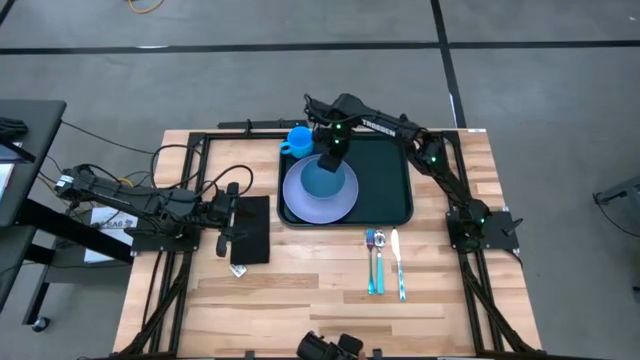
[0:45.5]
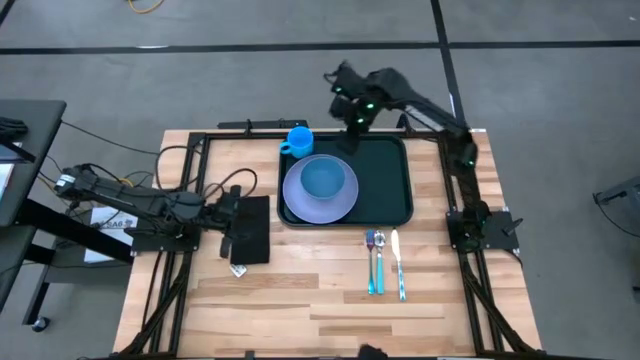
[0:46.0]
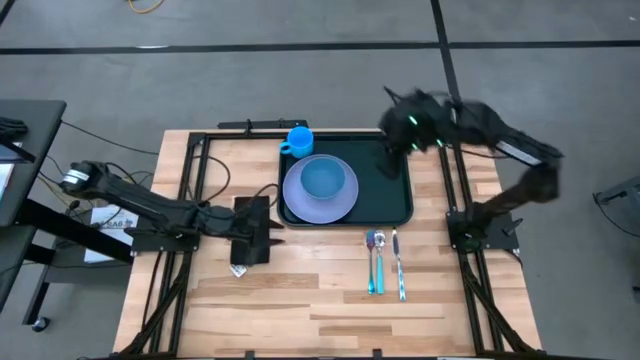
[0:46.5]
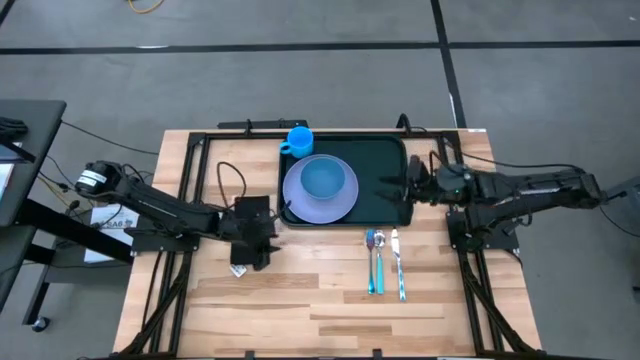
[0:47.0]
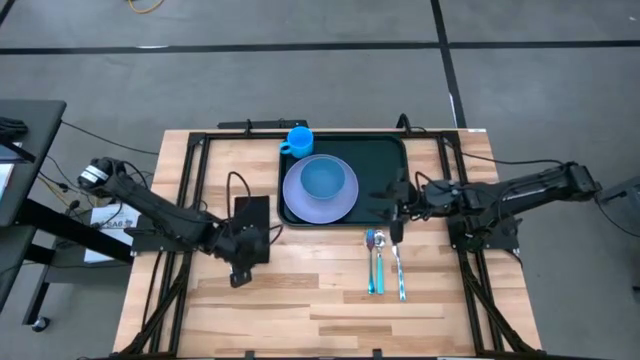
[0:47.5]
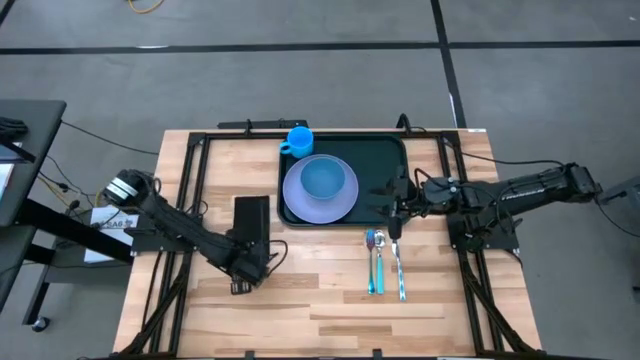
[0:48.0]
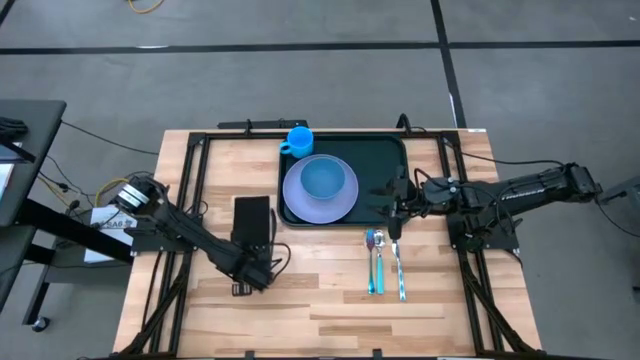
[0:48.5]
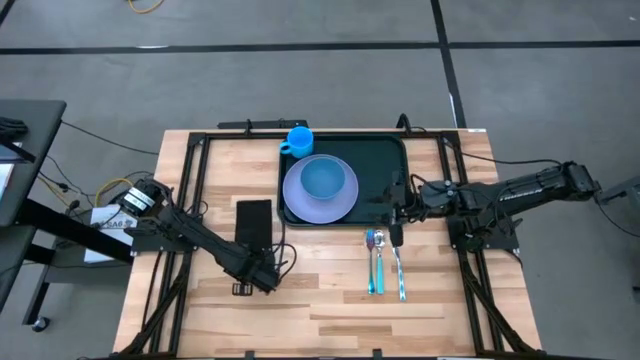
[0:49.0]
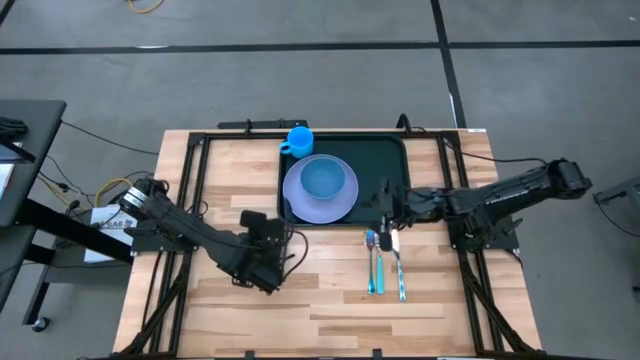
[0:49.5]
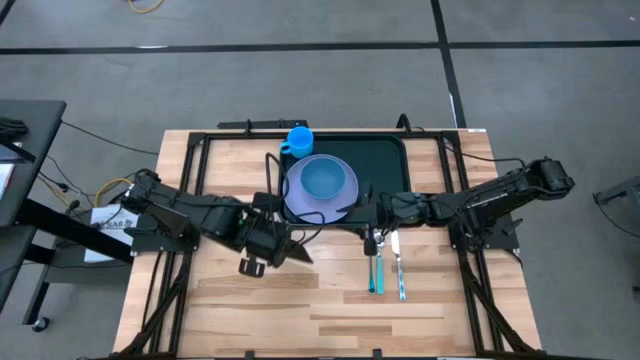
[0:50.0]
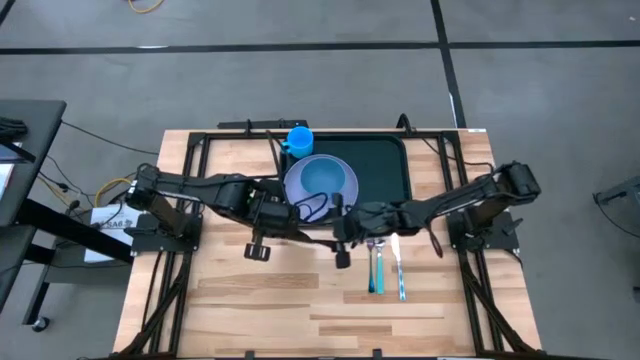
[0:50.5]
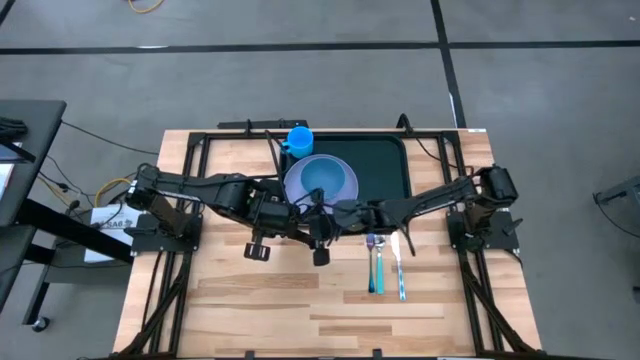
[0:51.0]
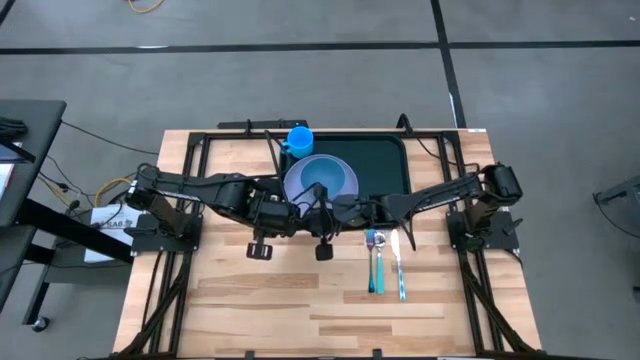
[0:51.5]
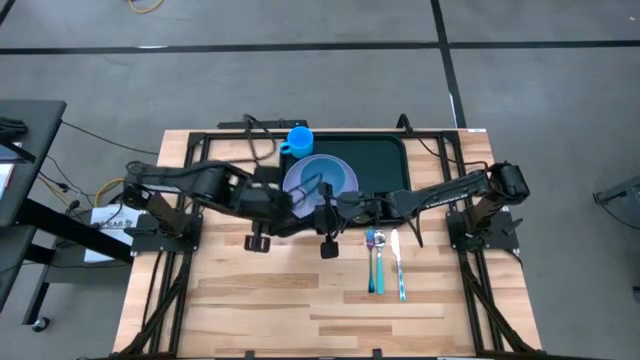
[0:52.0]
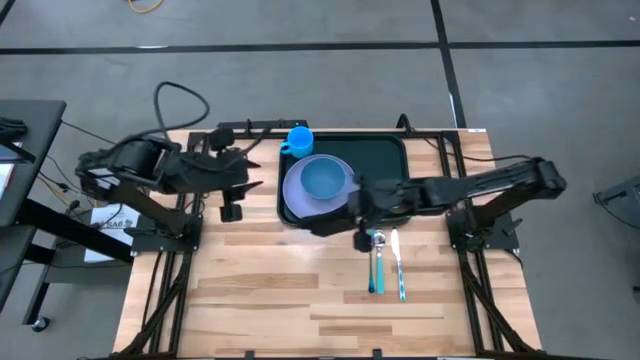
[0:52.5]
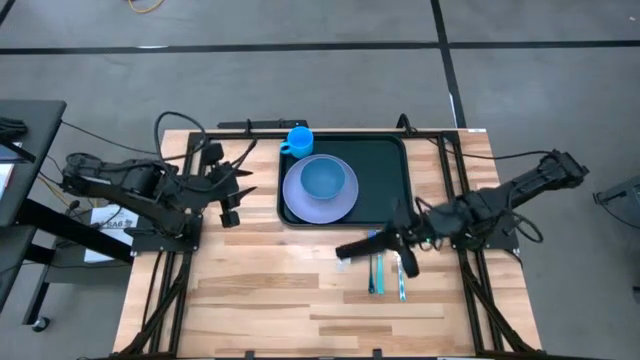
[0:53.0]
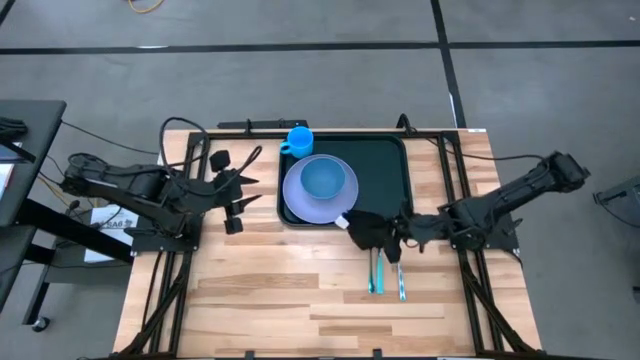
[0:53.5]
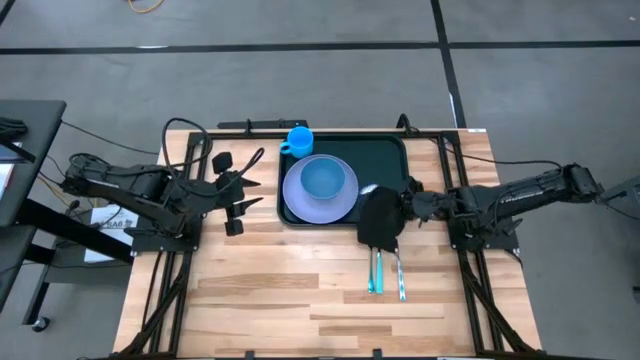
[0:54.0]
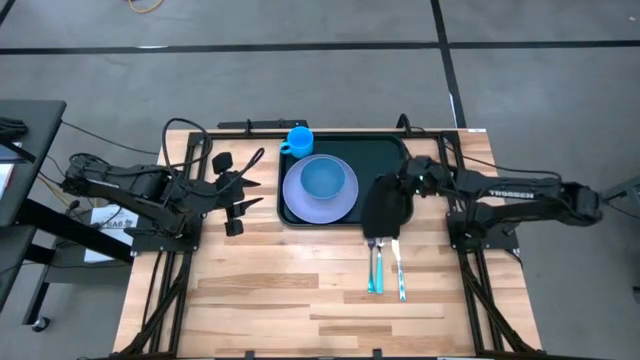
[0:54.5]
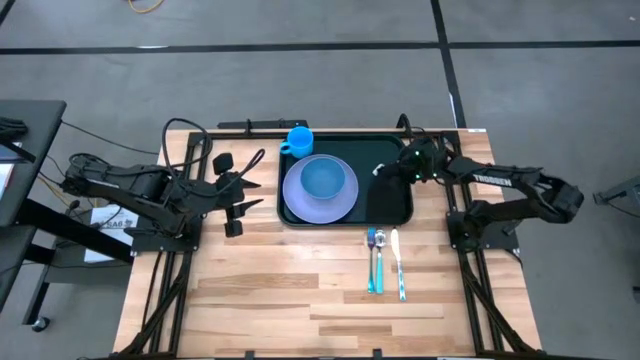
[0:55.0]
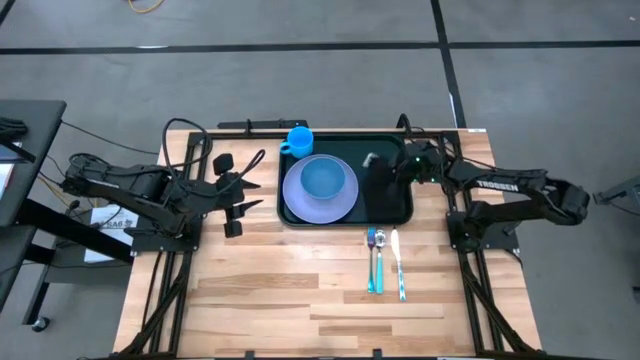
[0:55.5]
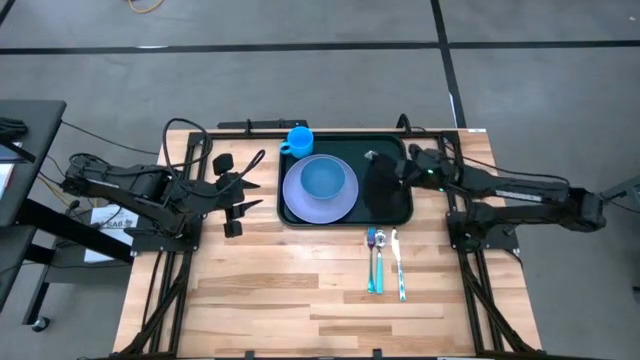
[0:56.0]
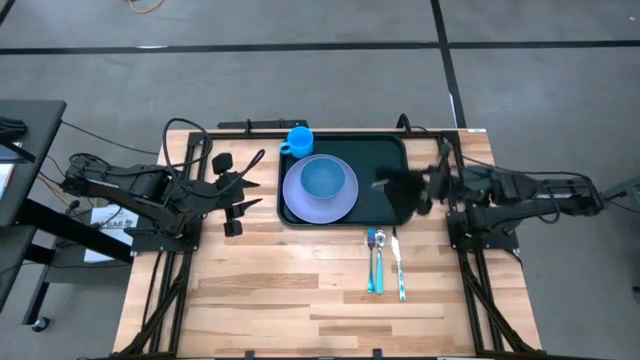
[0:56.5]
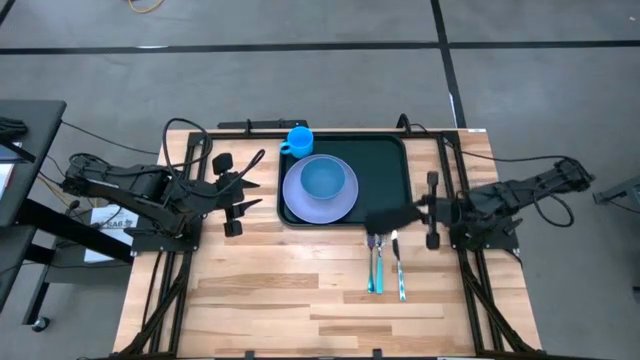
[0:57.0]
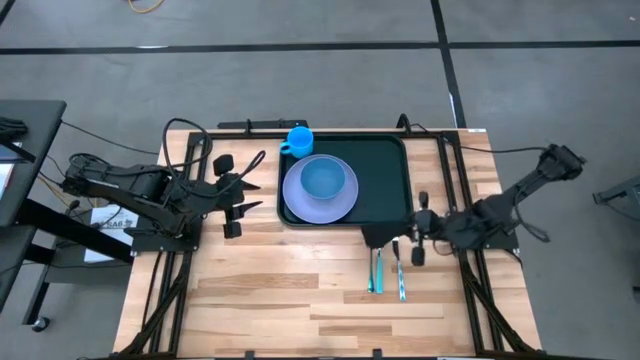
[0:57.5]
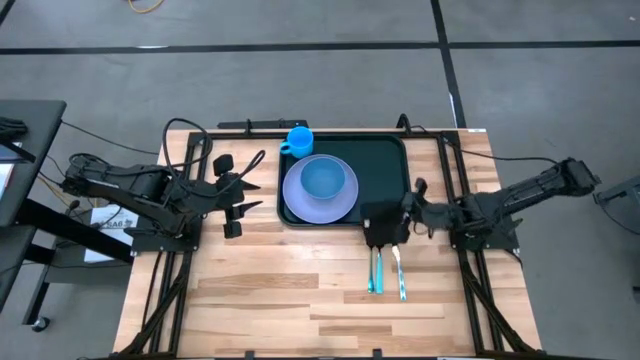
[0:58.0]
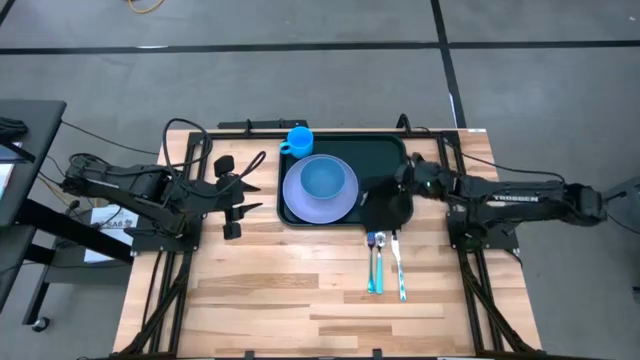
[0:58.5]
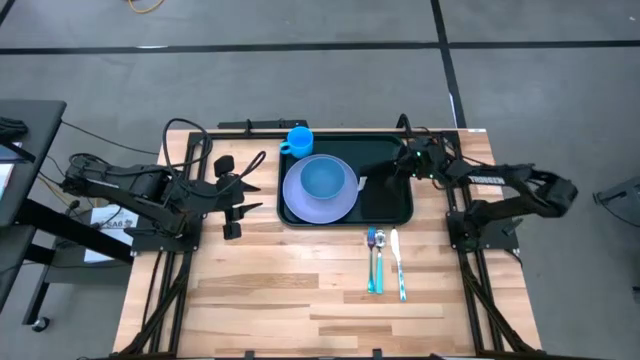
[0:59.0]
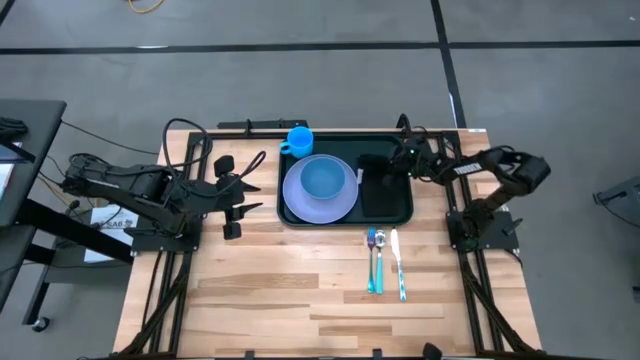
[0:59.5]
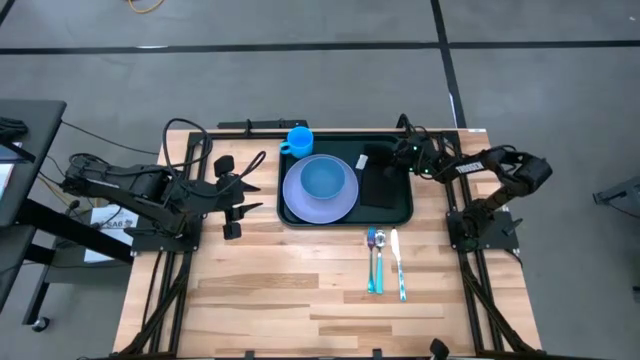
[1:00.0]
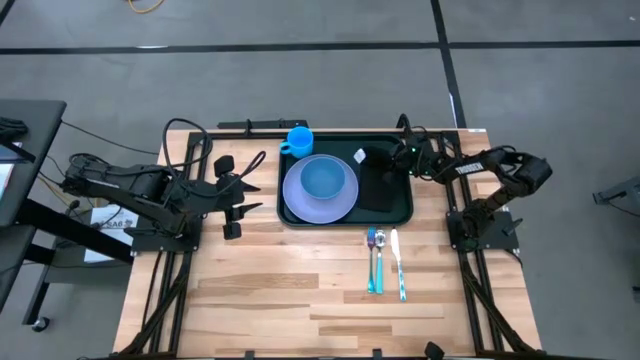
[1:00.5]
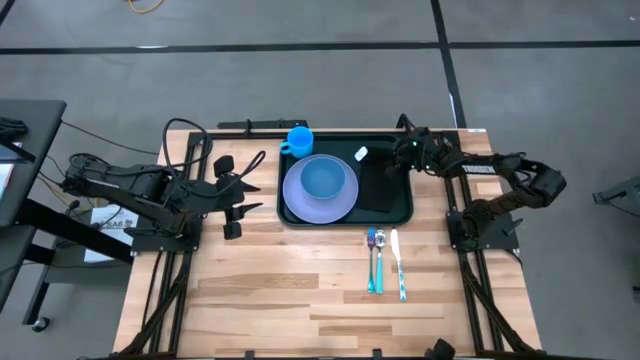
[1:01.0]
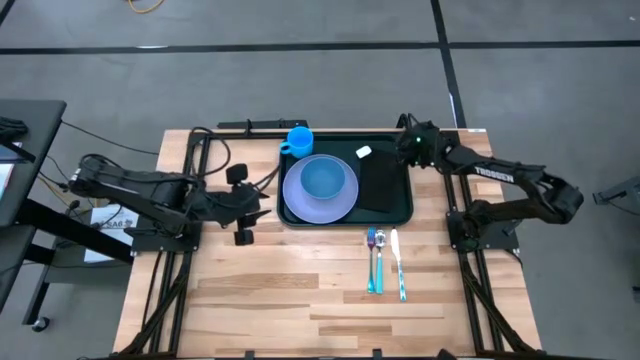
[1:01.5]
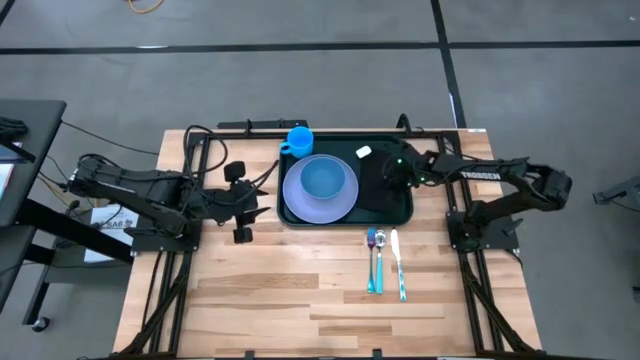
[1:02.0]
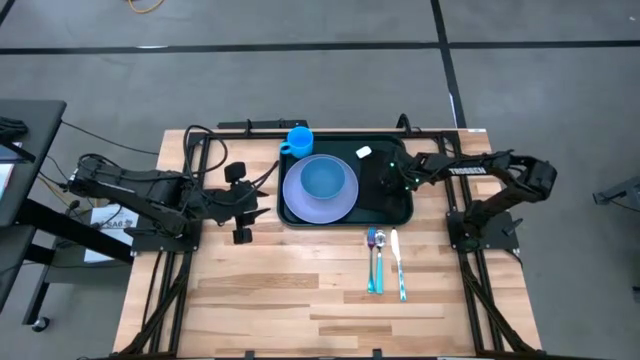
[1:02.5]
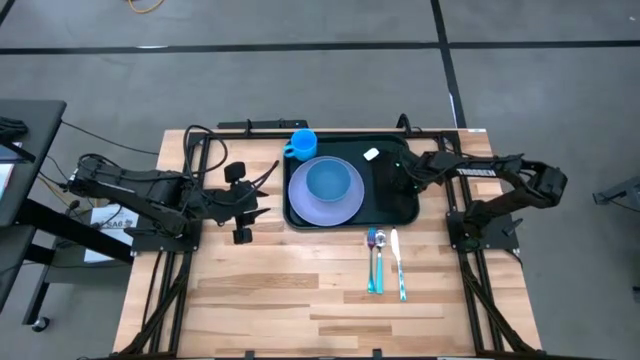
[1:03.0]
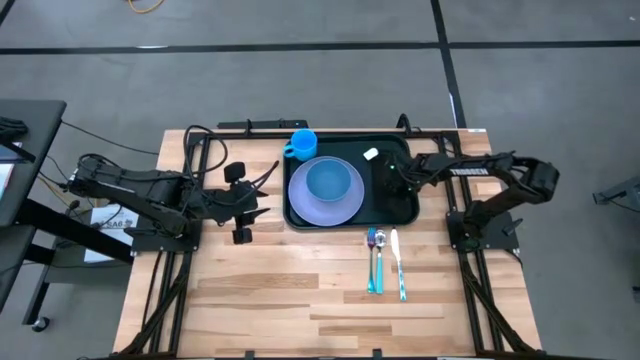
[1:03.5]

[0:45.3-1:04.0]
Task: Set up tray
Put the black napkin on the black tray

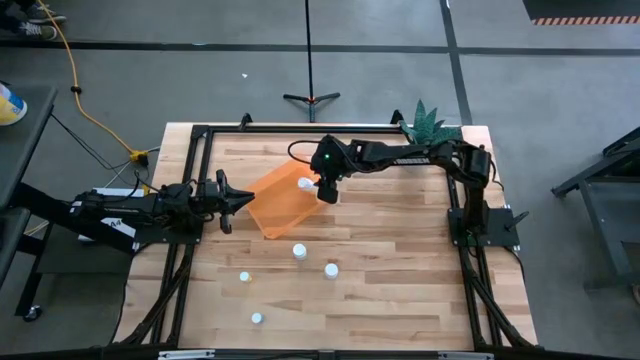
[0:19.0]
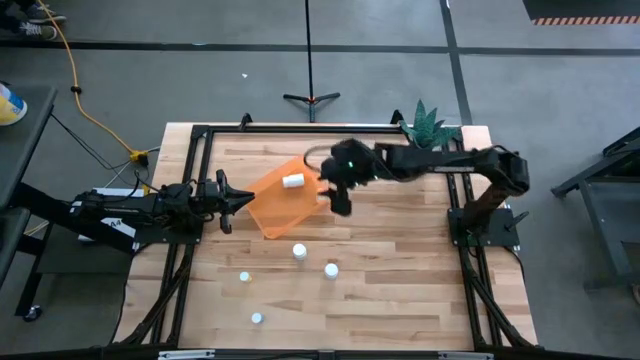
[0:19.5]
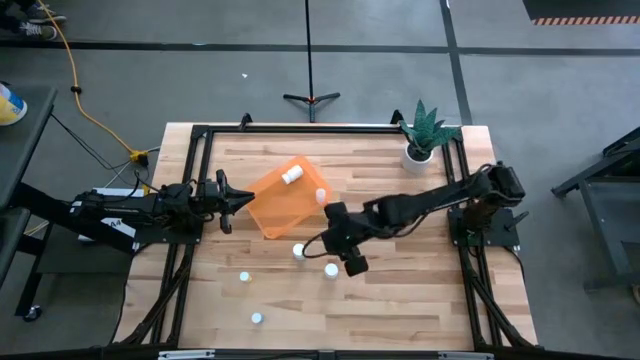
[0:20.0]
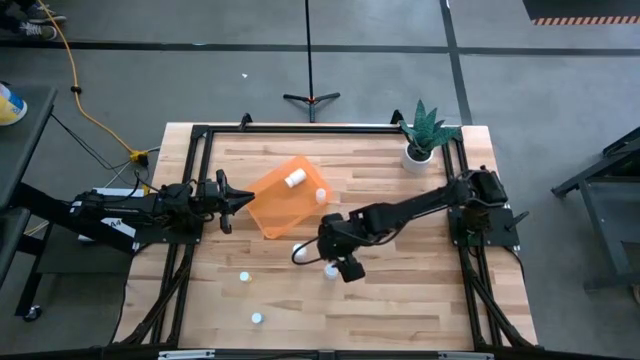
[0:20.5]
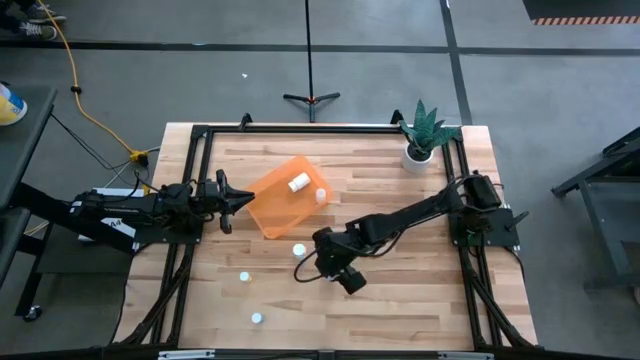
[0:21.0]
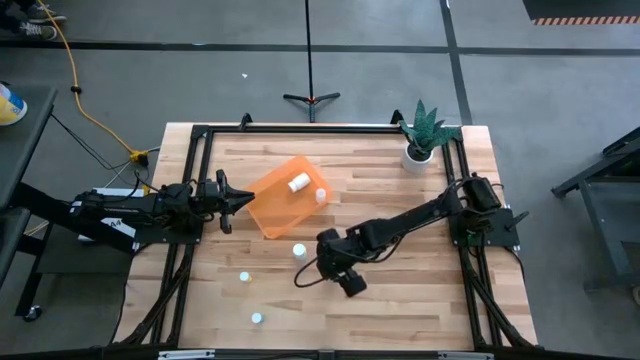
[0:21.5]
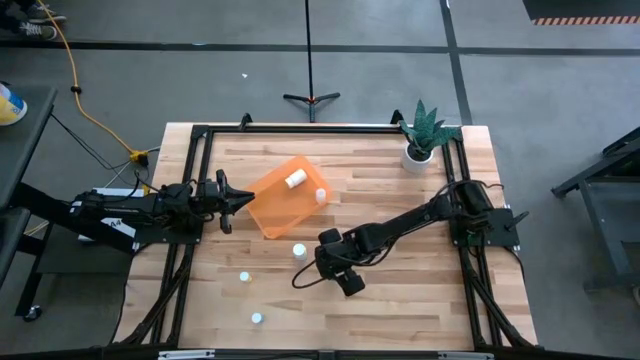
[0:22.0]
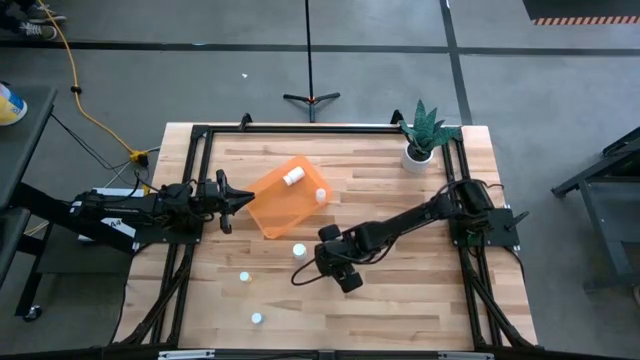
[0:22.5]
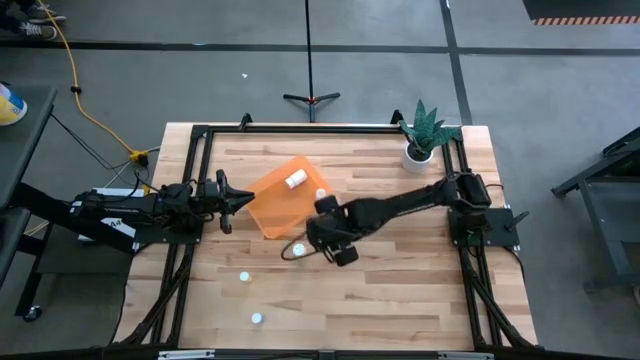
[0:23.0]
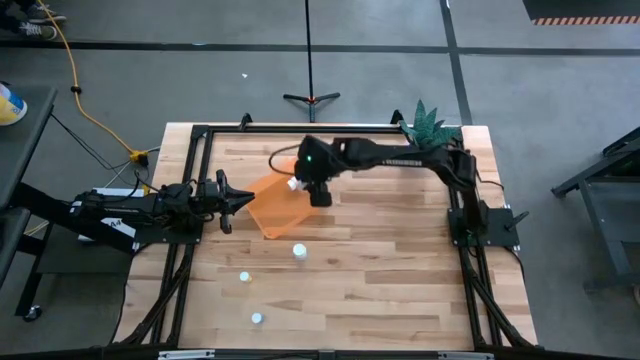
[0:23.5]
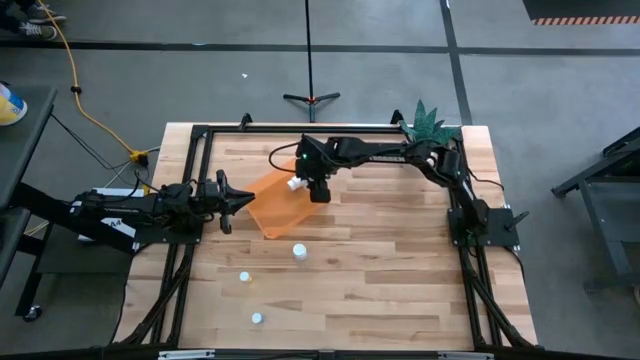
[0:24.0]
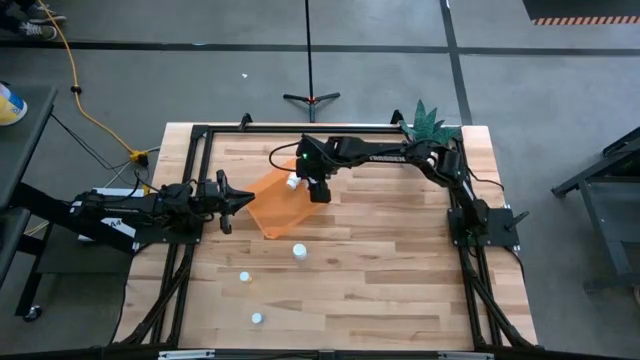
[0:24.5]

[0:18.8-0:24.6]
Task: Pick and place pill bottles into a basket
Put the bottom white pill bottle into the orange bin
